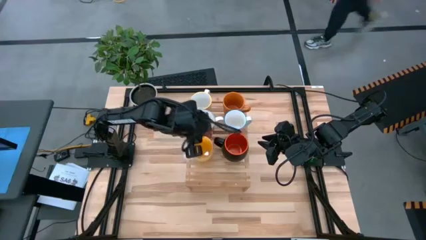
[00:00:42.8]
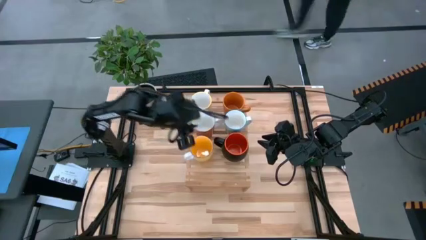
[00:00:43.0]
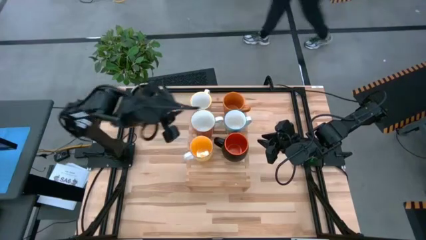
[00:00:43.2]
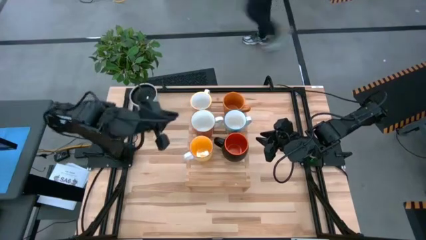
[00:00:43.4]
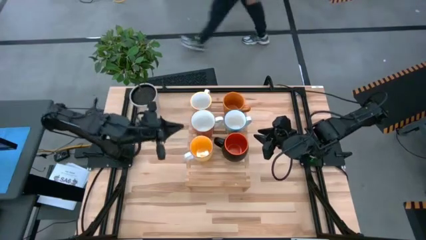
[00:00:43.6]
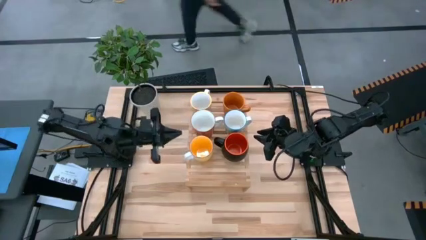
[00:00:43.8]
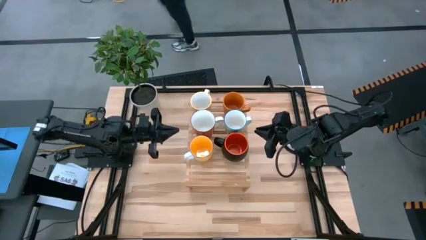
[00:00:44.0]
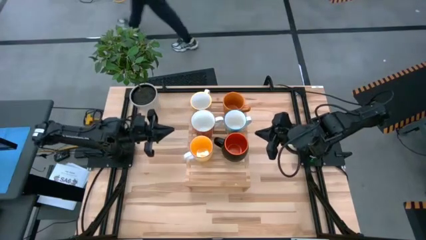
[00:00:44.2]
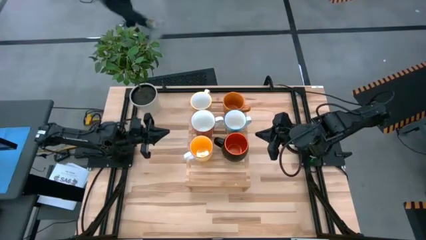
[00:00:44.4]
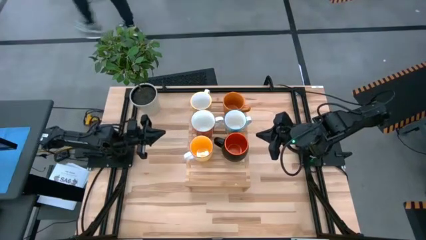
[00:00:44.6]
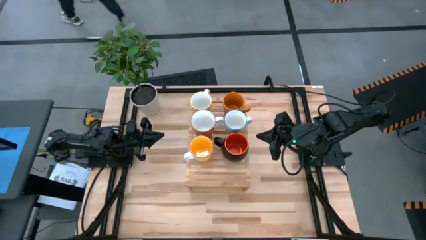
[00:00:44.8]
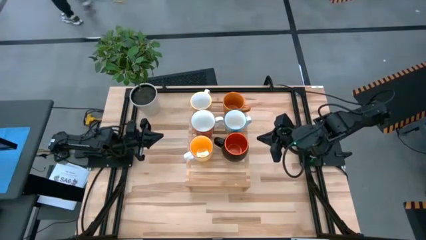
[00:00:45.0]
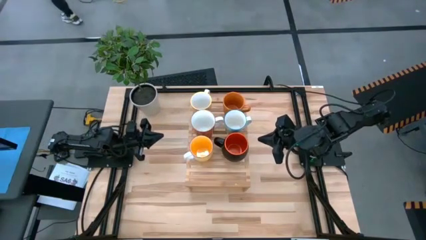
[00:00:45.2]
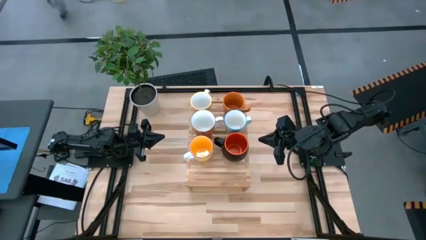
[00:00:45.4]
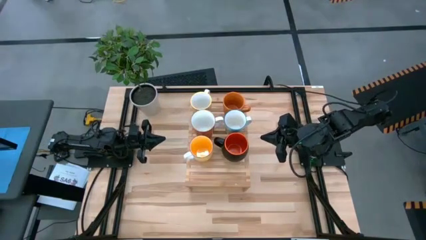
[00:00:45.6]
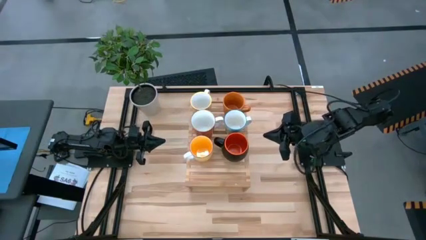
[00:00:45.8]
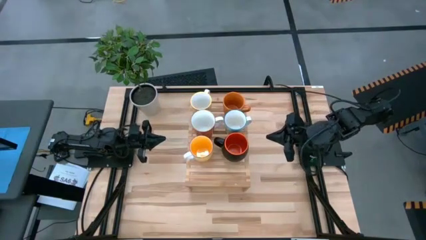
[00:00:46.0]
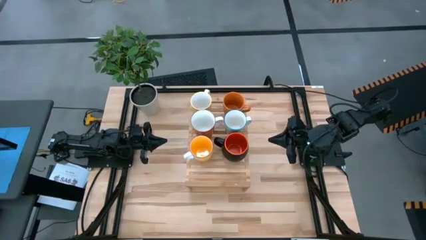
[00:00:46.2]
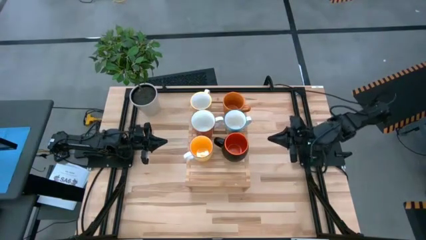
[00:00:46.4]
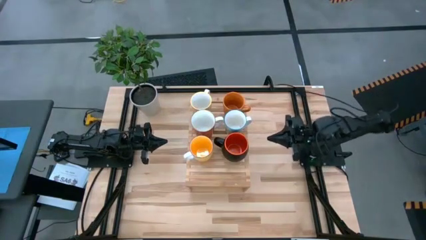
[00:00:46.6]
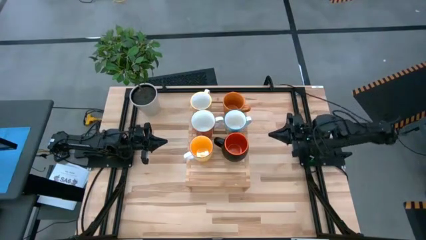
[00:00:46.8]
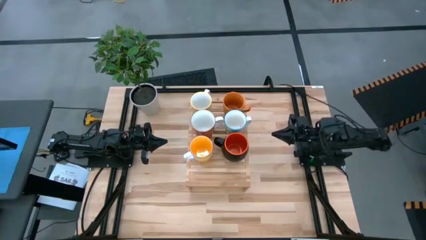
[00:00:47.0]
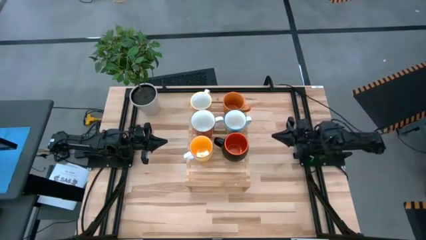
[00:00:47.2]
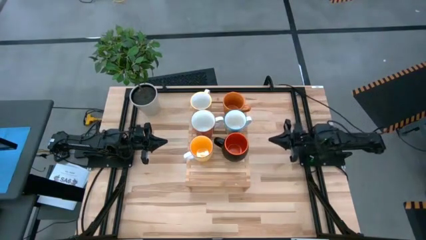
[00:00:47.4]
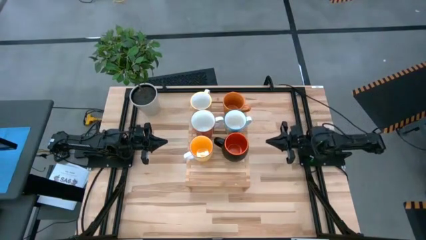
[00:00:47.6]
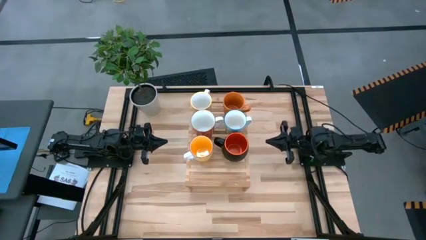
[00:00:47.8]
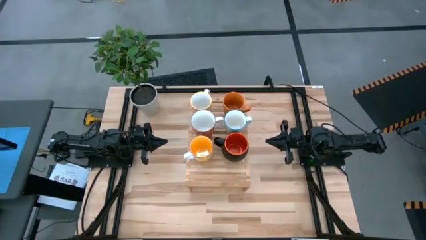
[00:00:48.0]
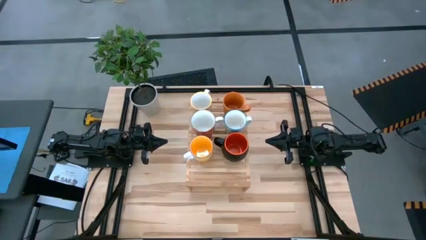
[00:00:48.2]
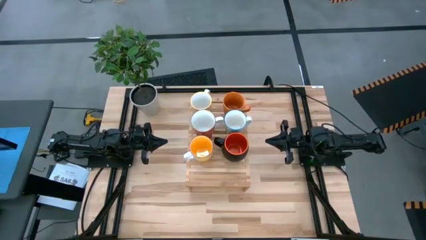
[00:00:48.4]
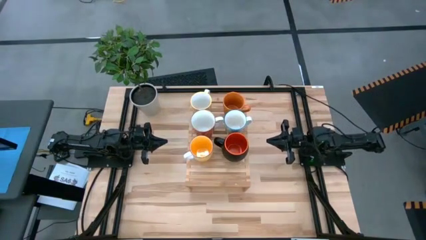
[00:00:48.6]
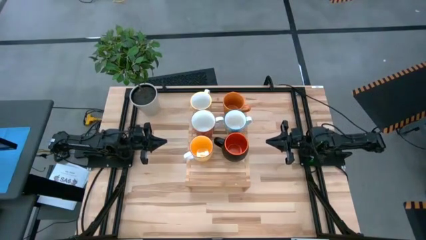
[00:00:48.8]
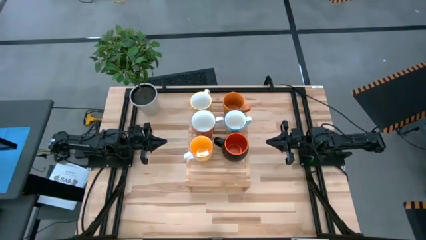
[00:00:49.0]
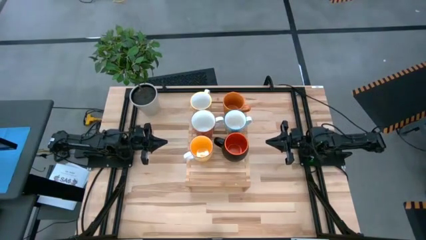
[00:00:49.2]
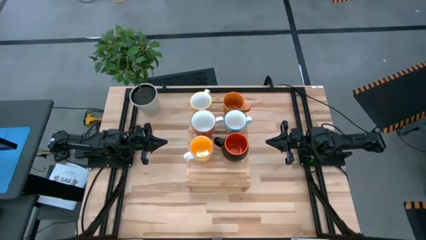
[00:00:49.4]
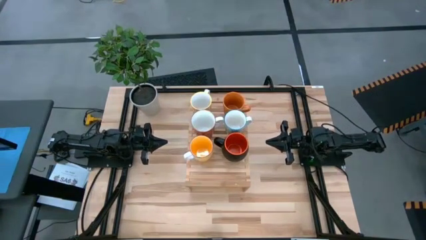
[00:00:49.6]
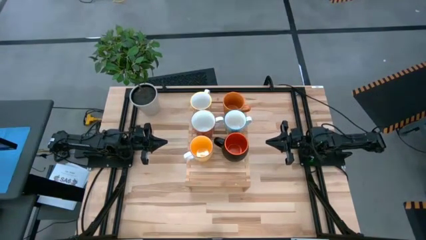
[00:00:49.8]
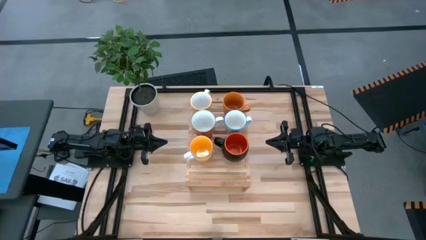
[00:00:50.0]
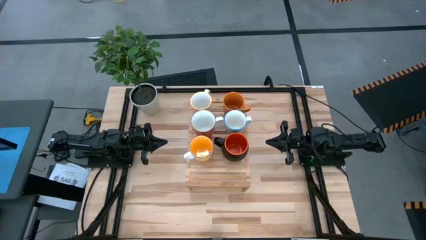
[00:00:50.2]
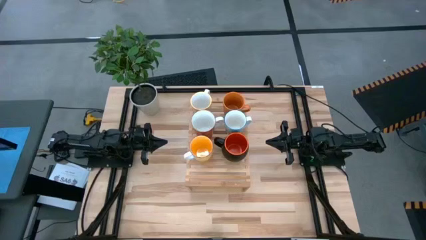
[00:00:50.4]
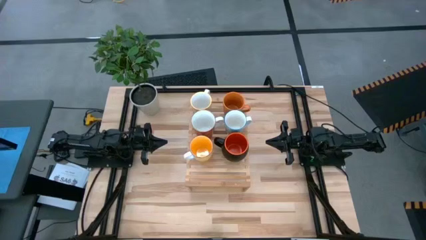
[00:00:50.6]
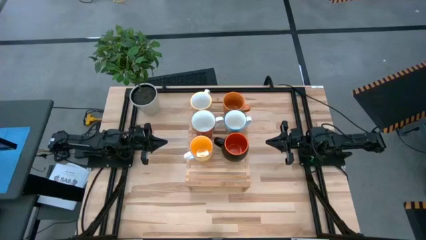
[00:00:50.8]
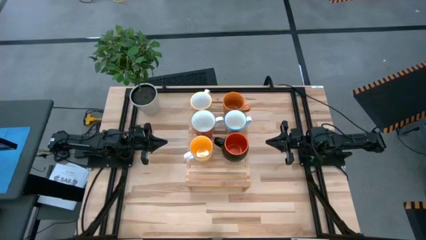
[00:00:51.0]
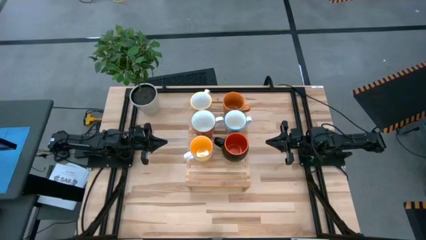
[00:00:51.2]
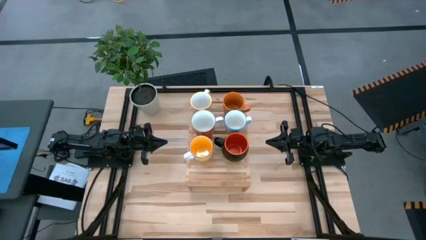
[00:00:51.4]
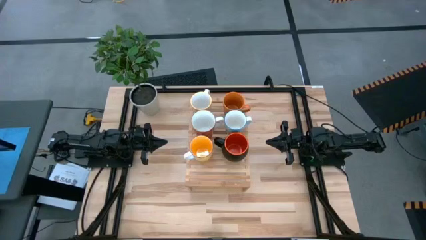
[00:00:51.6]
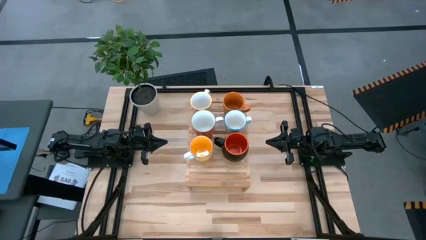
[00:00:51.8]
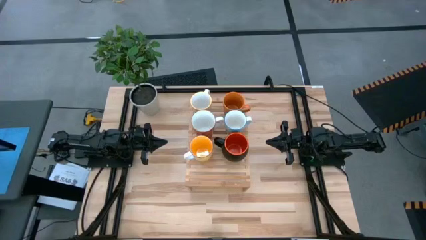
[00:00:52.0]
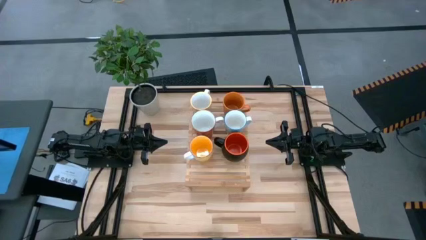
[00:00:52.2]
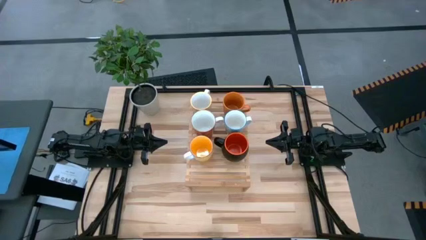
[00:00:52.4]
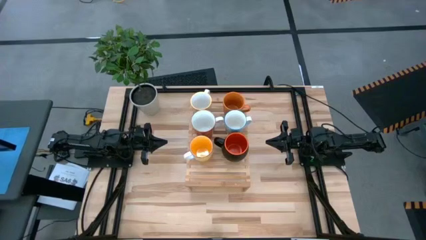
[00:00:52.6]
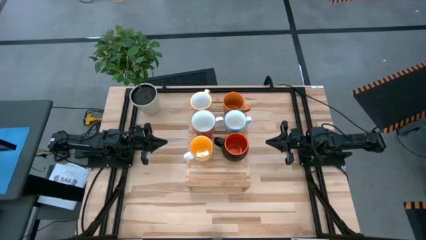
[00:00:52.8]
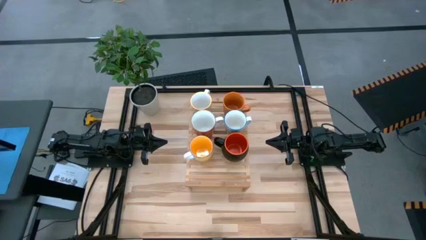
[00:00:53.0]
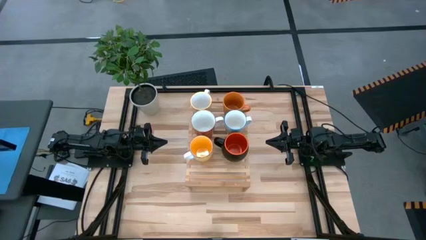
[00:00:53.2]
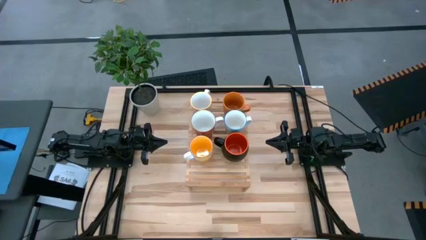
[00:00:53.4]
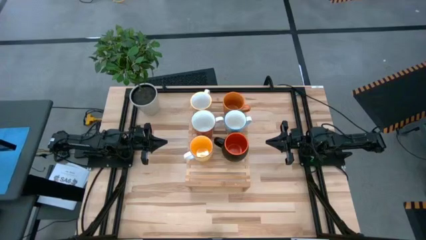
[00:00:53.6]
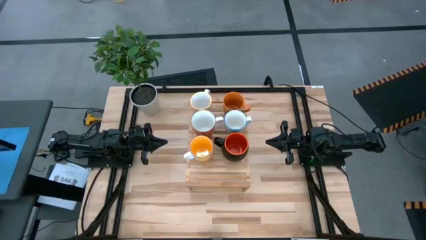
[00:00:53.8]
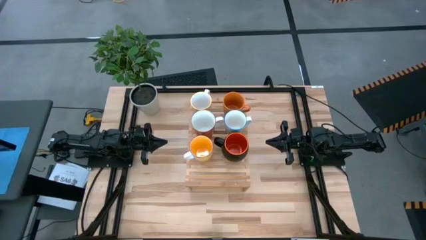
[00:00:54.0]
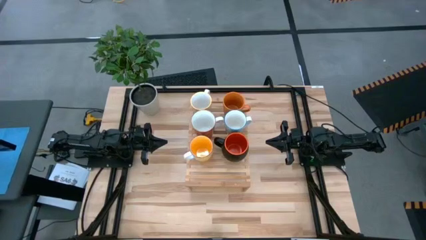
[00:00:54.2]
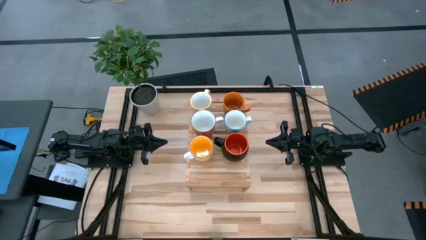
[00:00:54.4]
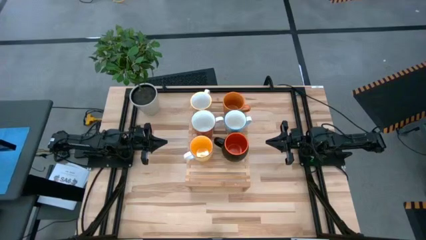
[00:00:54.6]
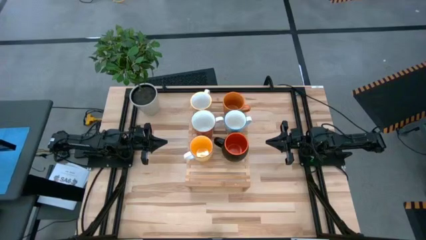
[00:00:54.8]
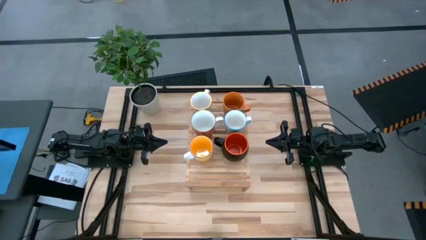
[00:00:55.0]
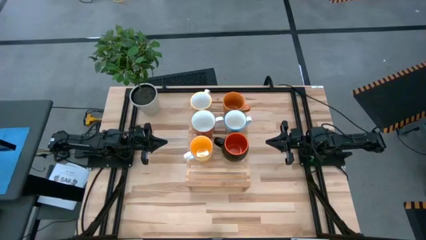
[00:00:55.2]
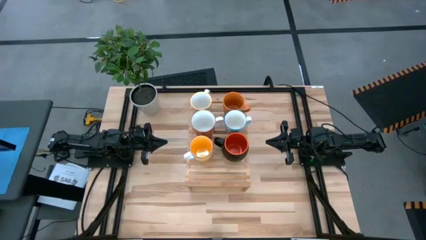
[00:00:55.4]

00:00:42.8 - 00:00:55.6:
Task: Place coffee mugs
Return to Home Position

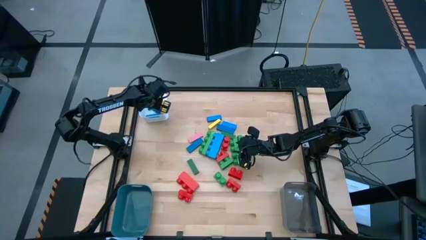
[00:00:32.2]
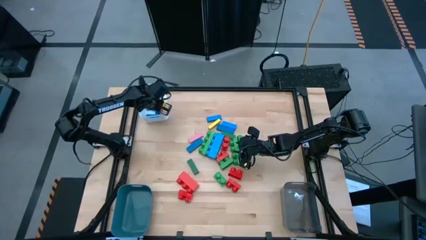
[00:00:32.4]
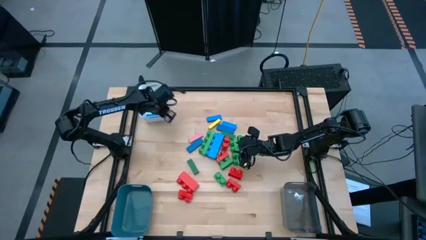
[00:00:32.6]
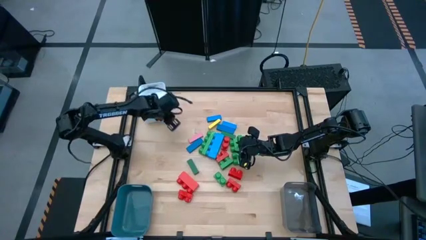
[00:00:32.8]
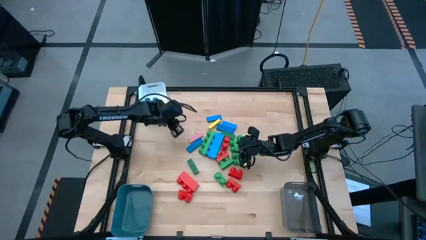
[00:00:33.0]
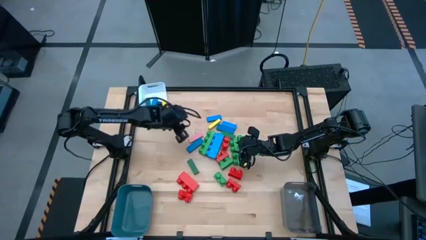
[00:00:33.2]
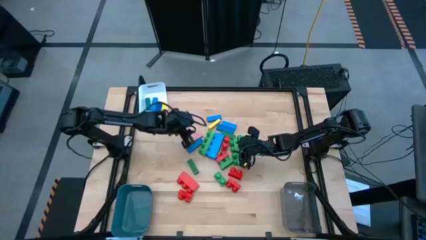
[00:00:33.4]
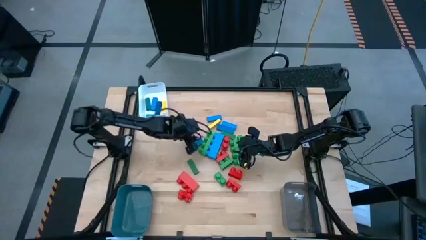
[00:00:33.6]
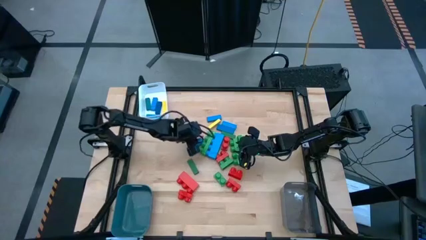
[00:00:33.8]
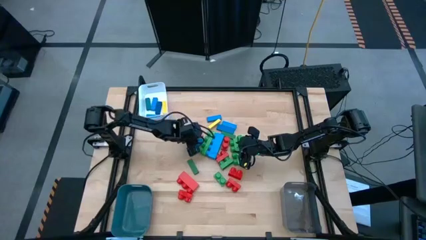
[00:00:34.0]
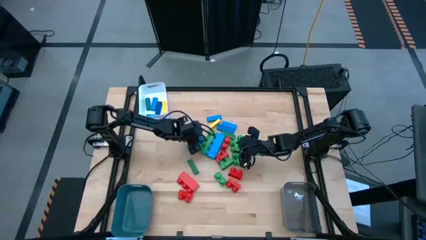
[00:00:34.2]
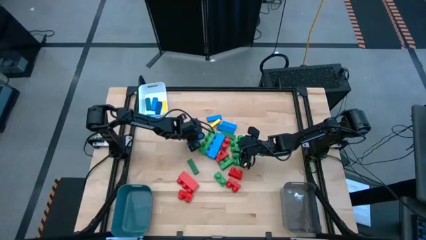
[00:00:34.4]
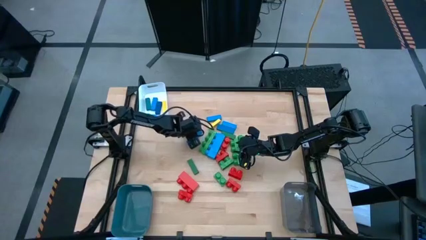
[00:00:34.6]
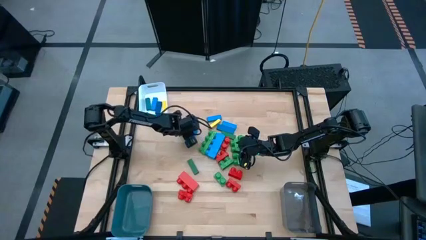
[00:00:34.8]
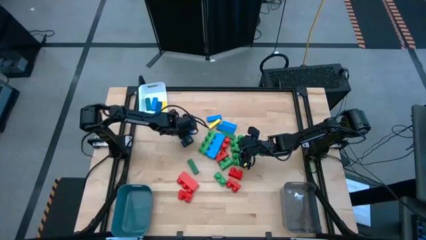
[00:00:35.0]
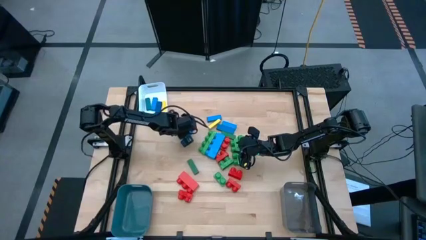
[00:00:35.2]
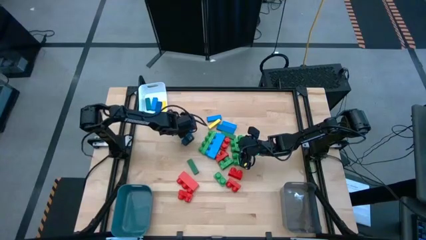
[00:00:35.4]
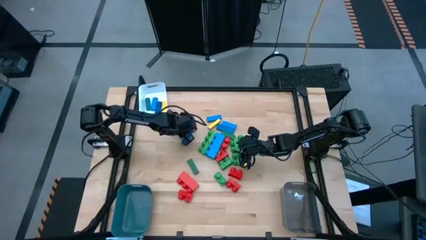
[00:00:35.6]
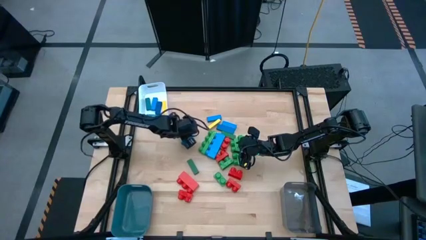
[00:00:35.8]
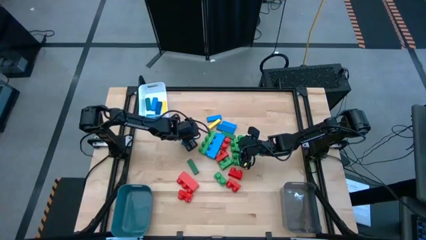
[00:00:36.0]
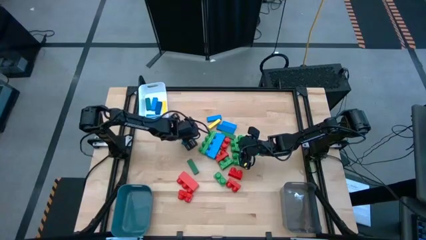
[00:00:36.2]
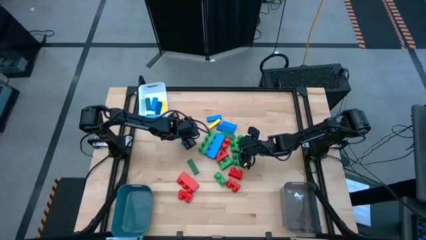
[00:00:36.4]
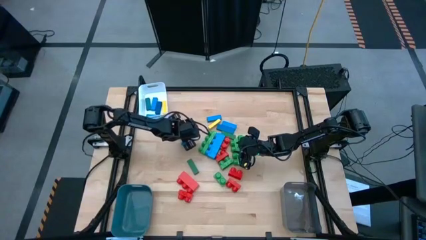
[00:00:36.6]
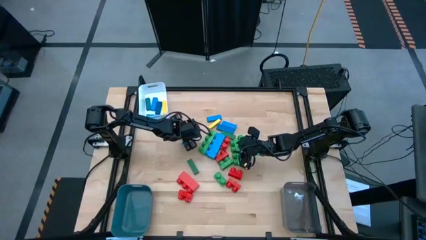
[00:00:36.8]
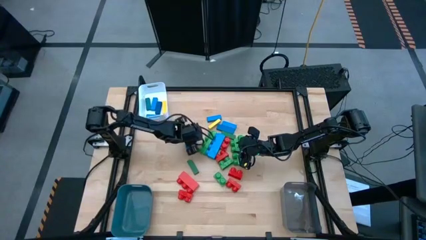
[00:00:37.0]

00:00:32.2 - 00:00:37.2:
Task: Sort blocks by size
Adjust the dark blue block on the table
